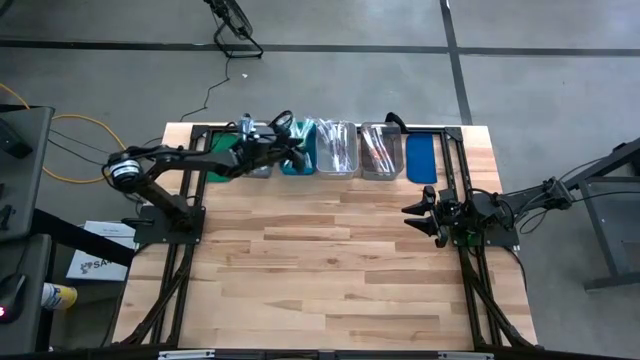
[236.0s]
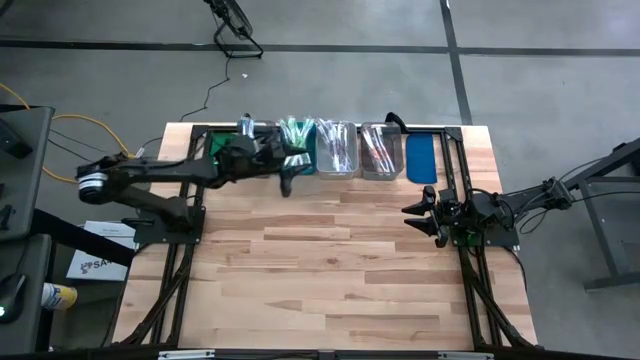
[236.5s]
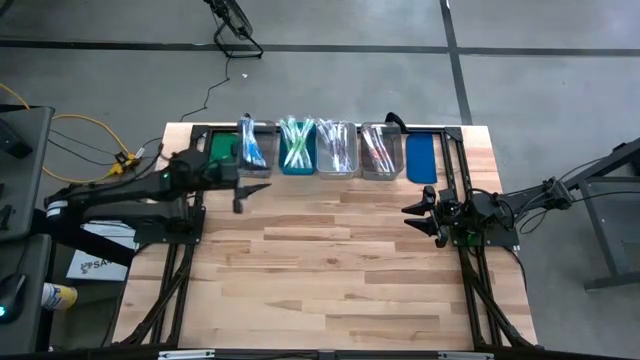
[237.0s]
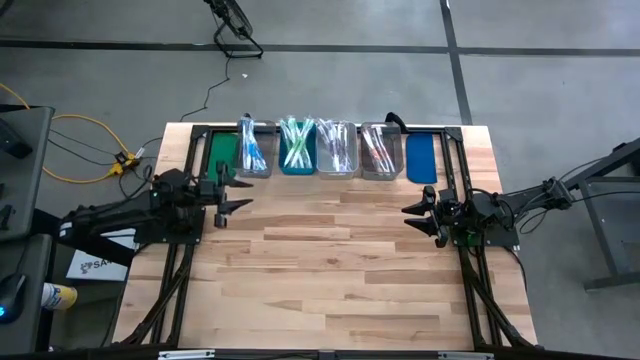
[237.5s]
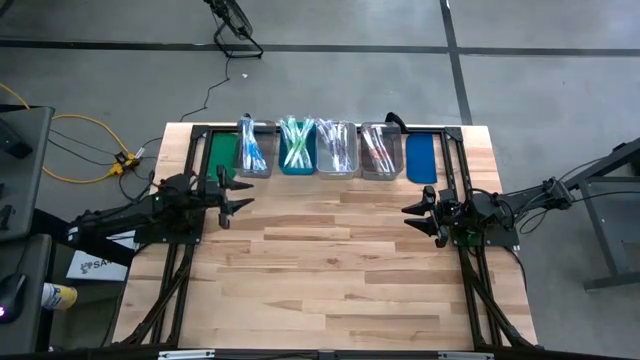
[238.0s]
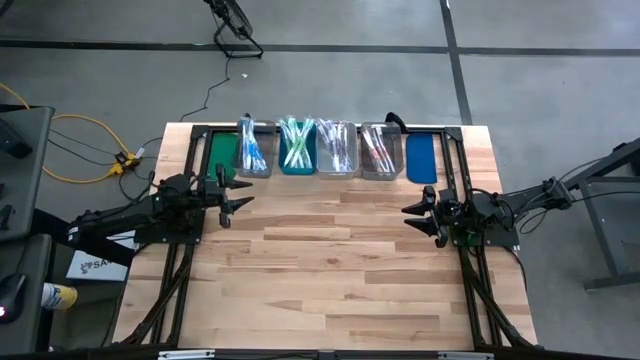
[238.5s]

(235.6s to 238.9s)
Task: Pick & Place Toothbrushes
Return to Home Position

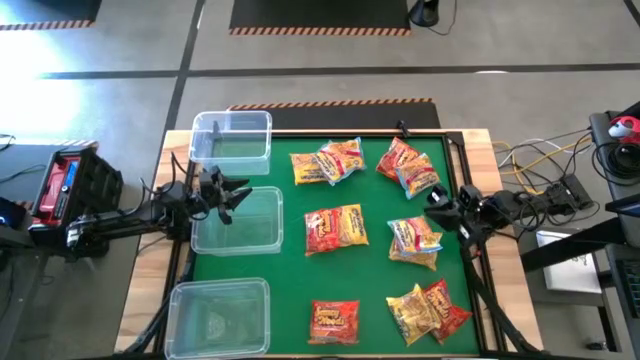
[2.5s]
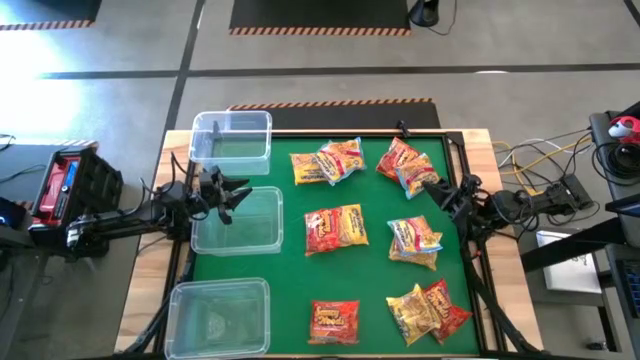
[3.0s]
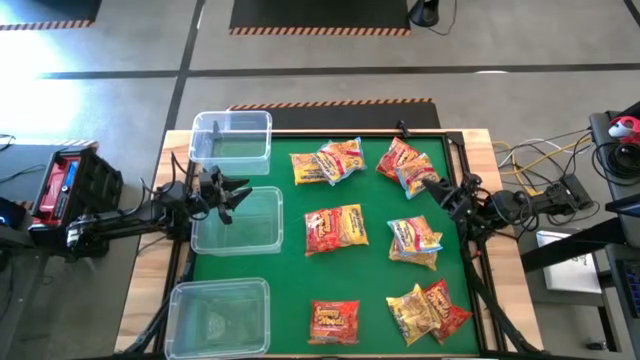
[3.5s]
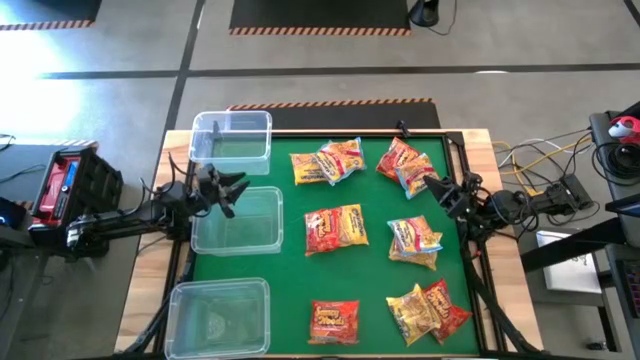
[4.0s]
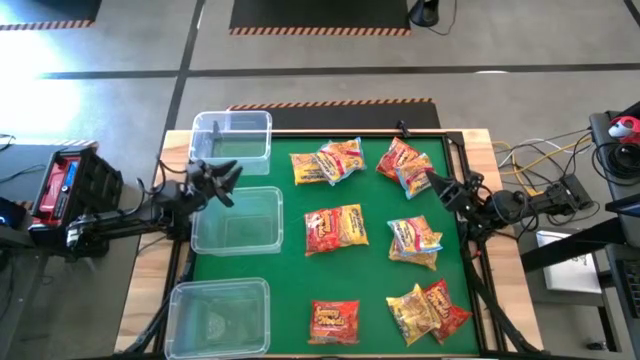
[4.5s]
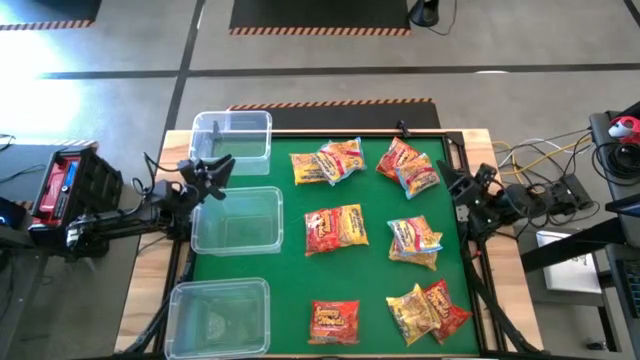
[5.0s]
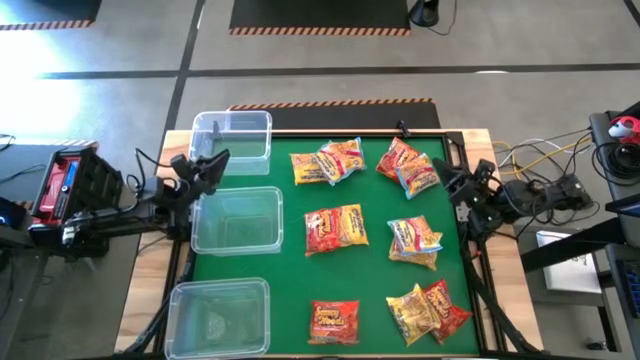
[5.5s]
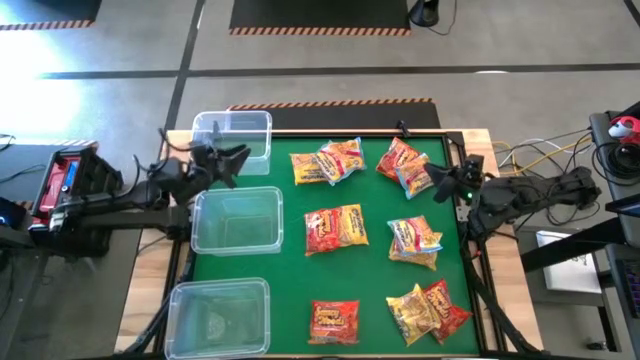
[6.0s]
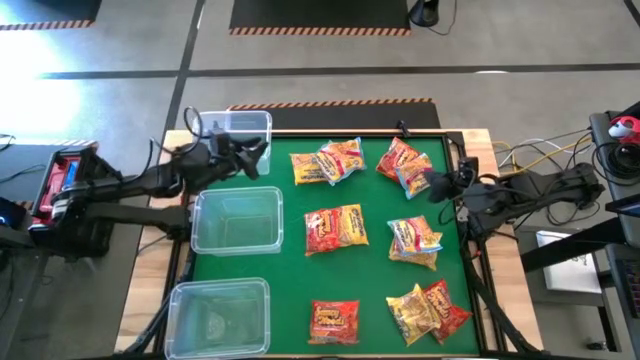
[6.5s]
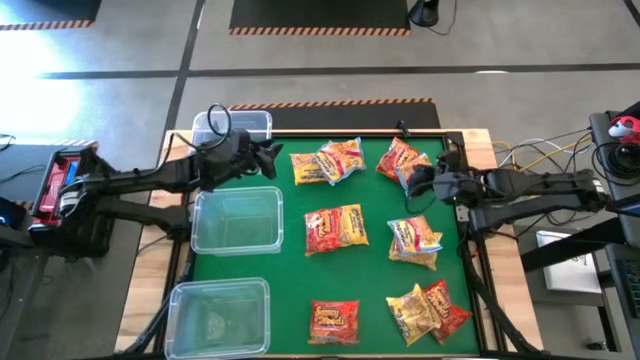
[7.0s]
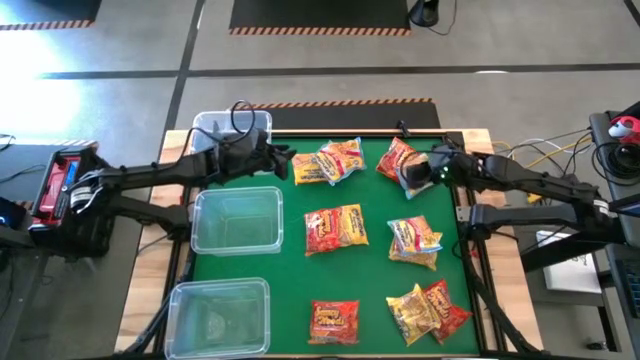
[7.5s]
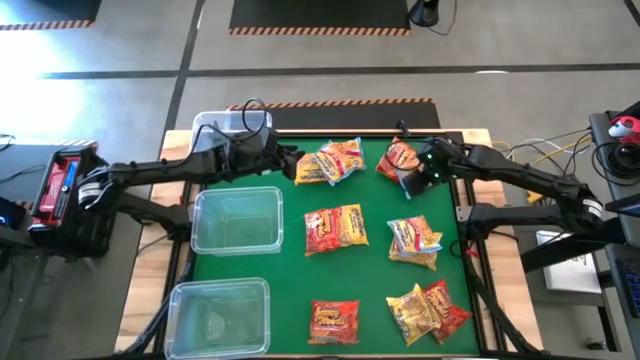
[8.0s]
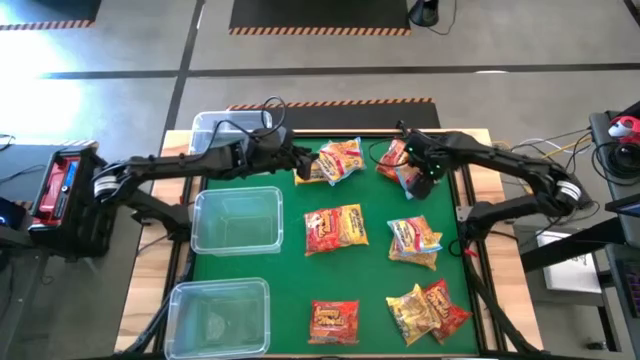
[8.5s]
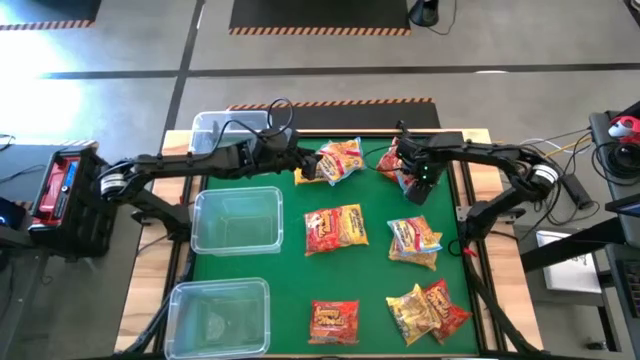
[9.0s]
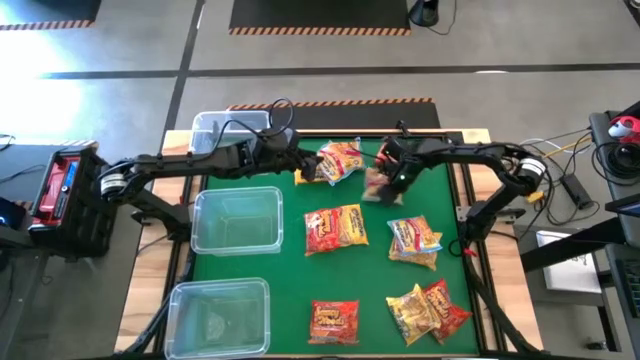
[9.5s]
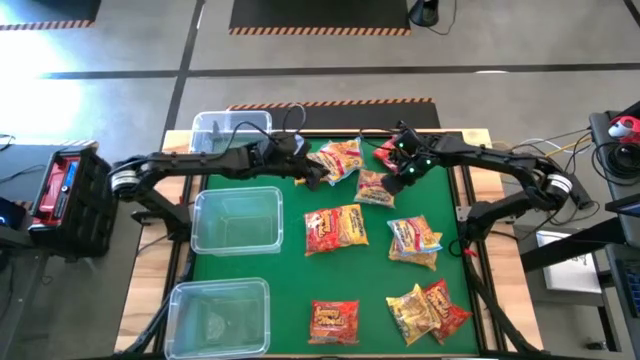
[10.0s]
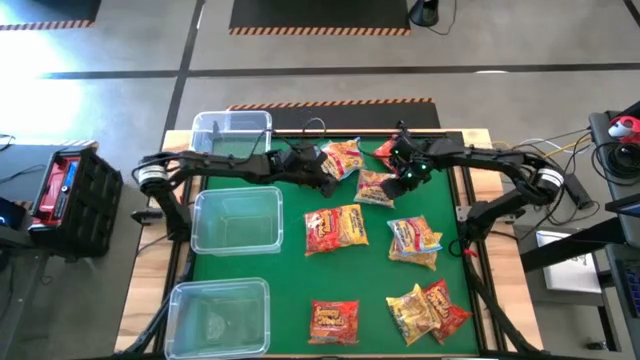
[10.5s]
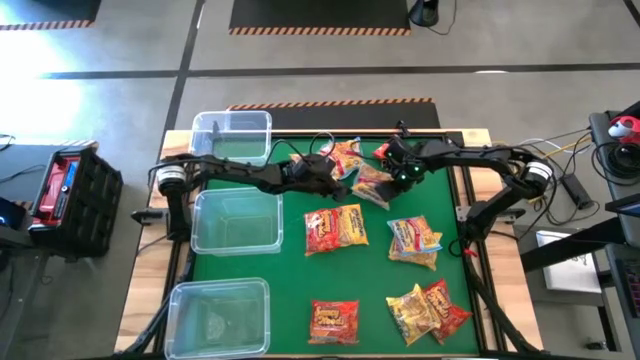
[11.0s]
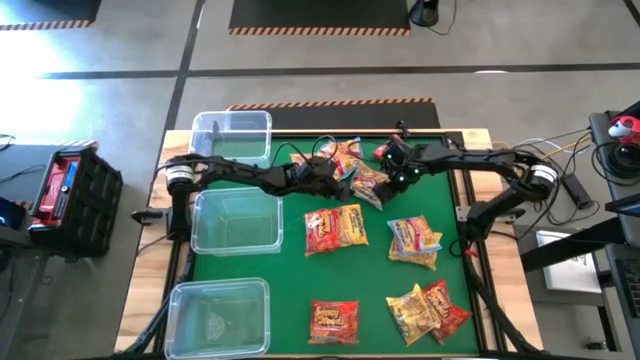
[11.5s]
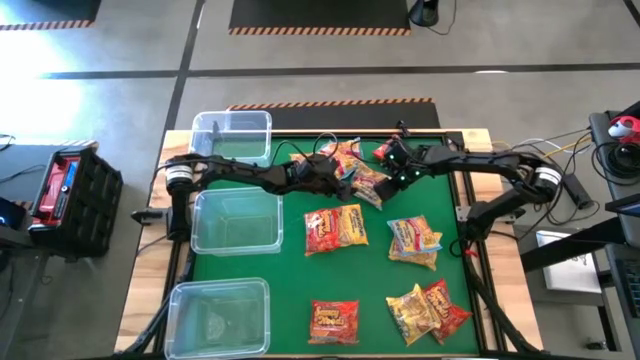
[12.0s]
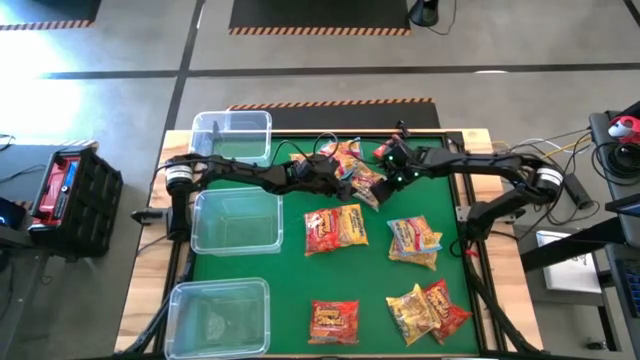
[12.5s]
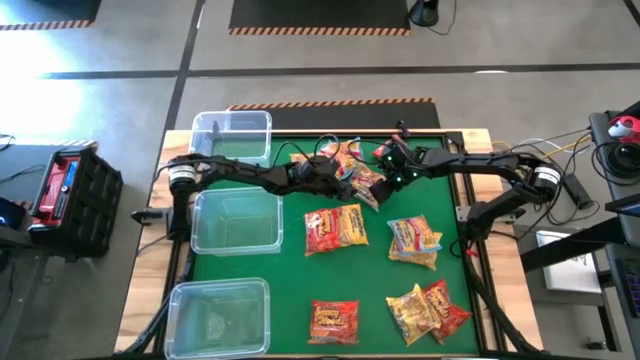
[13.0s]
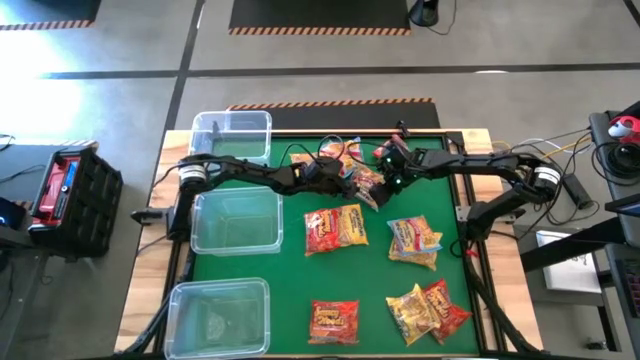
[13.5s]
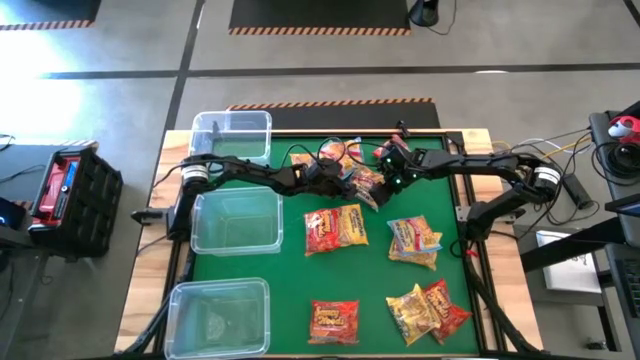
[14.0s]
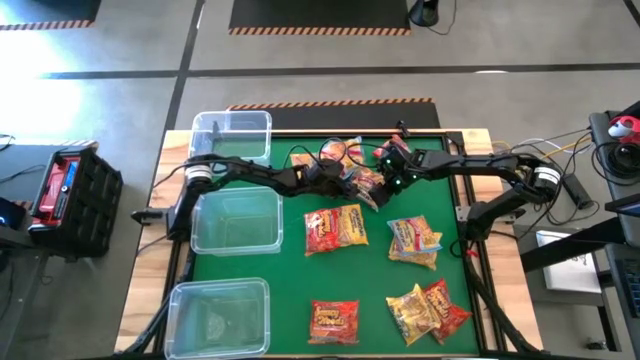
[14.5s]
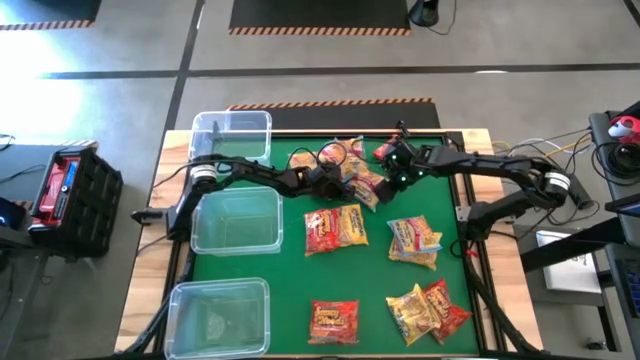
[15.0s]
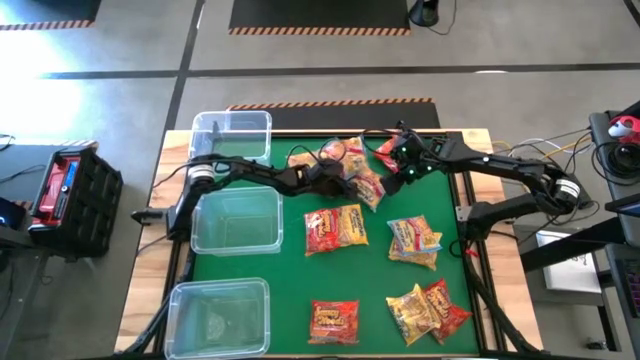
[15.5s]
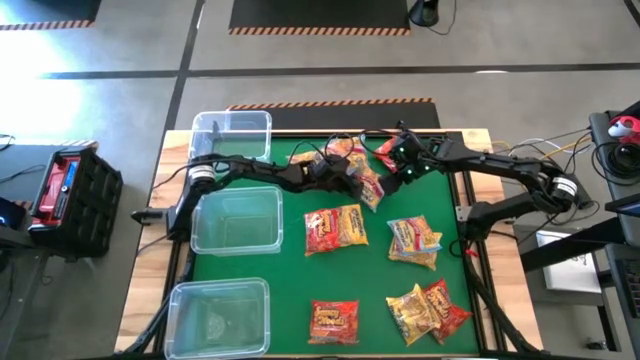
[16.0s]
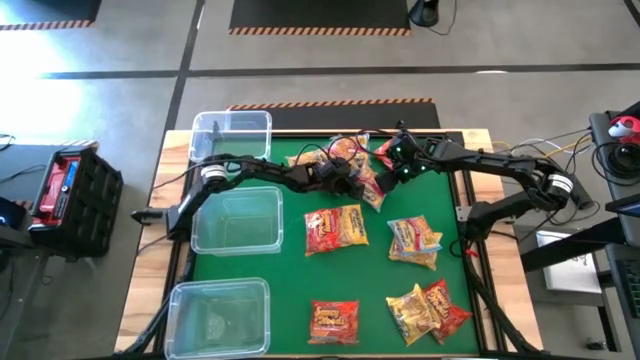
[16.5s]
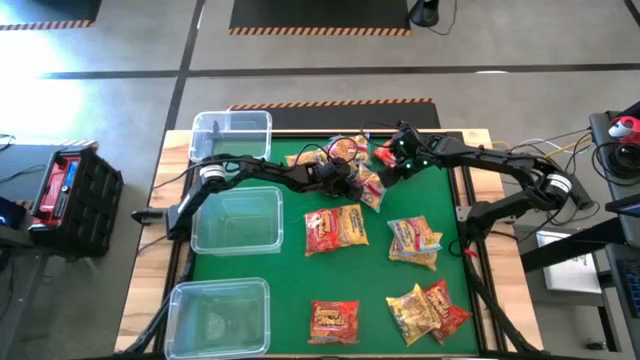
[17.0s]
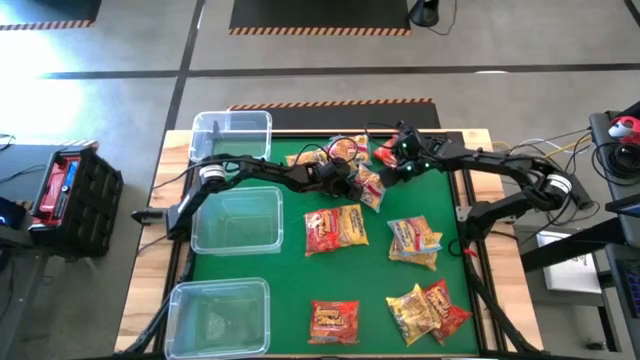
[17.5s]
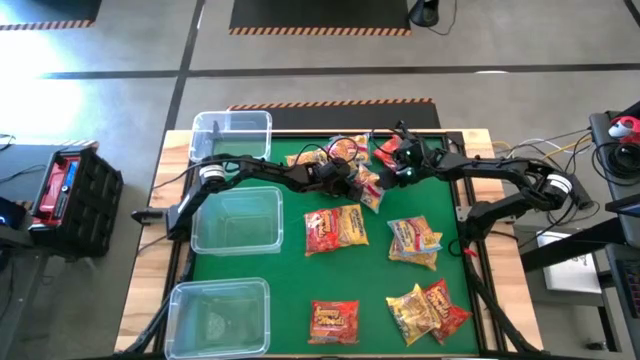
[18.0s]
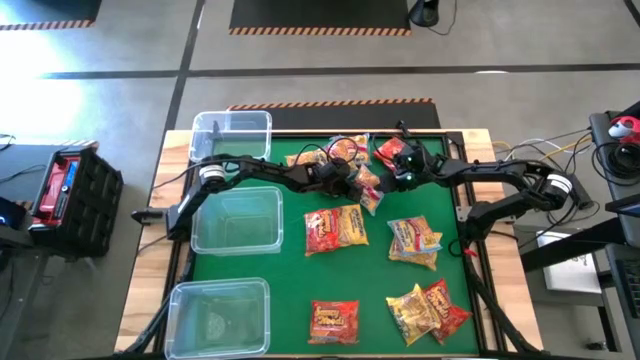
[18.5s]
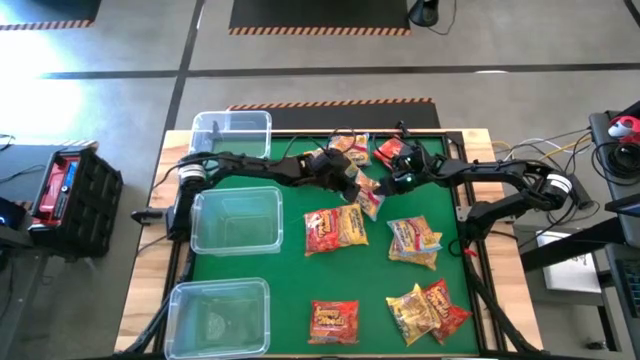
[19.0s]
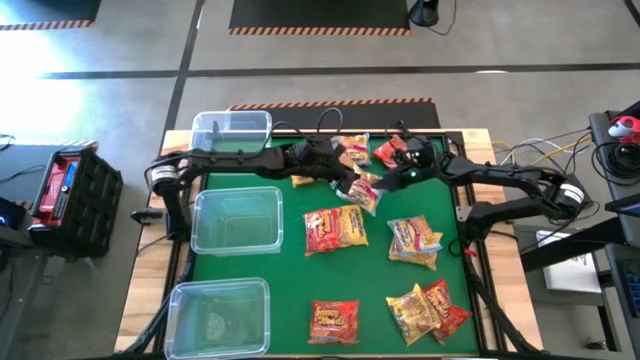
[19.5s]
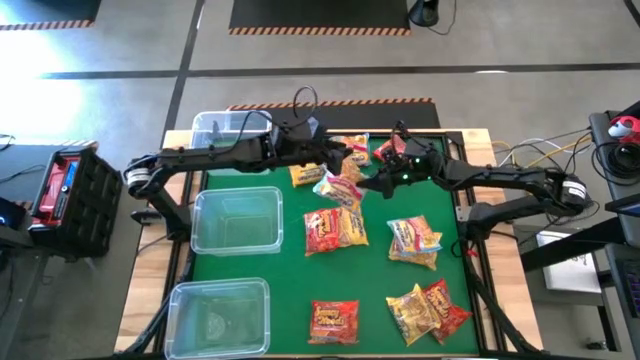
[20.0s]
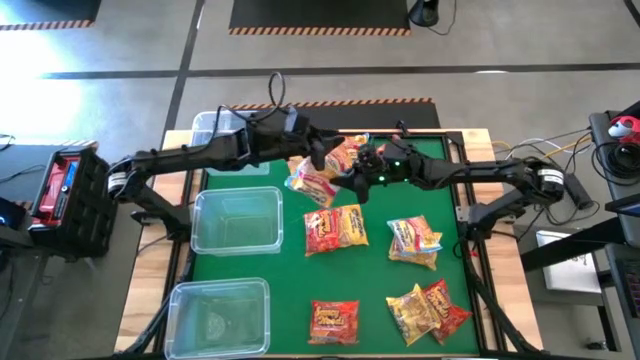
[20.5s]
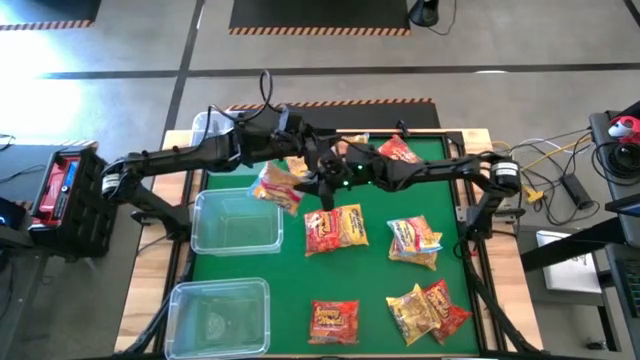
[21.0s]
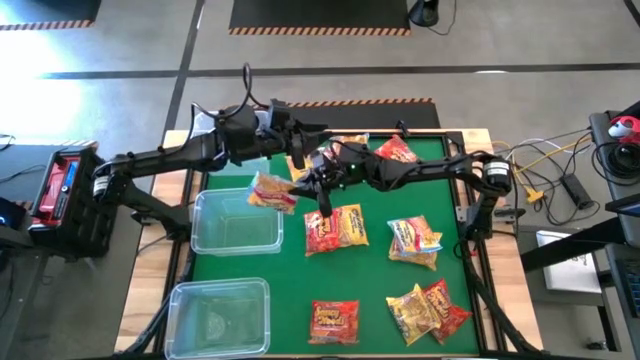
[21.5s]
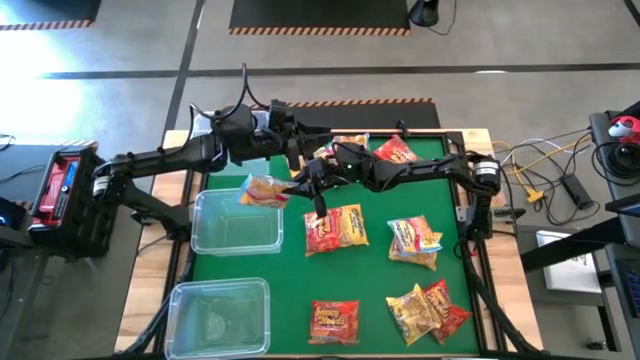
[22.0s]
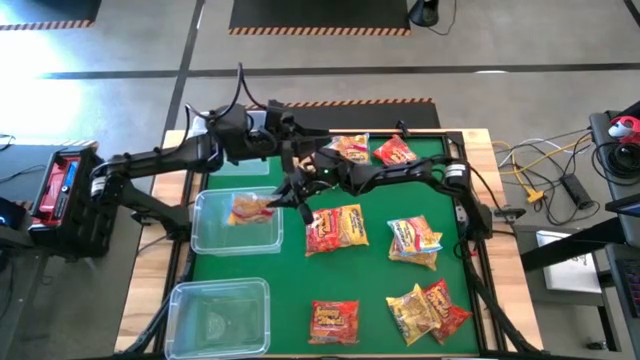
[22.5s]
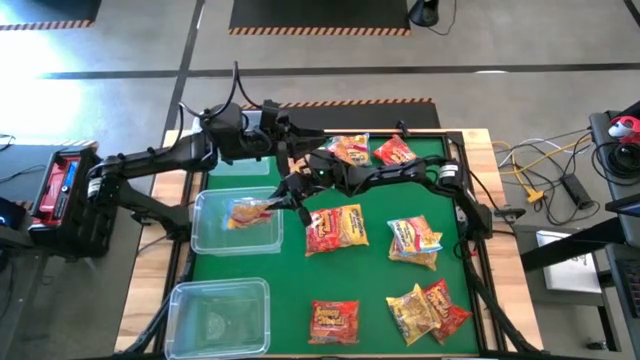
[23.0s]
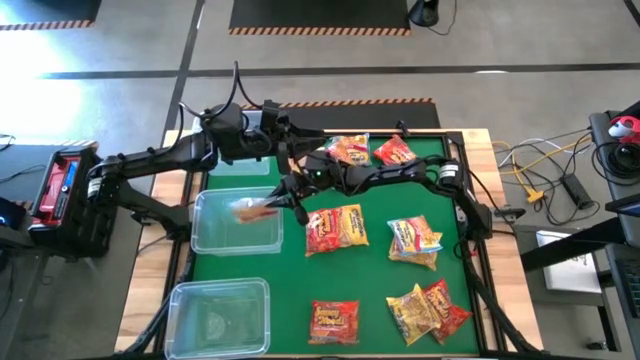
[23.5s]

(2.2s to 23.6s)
Task: Sort Maruchan noodles
Put the top right blue noodle pack into the middle transparent bin
